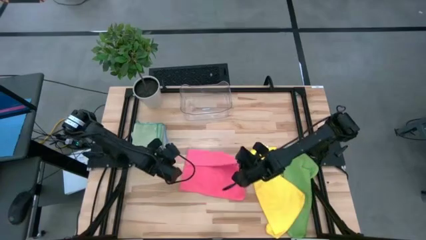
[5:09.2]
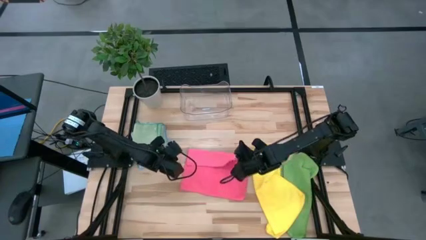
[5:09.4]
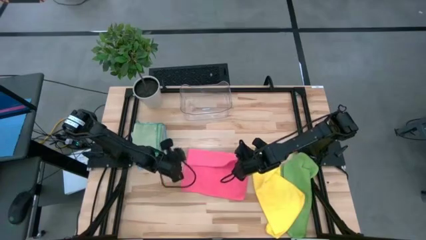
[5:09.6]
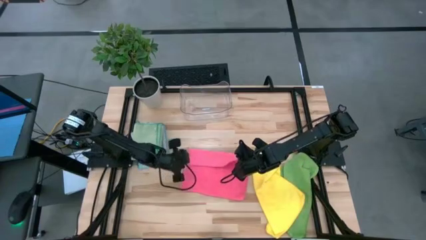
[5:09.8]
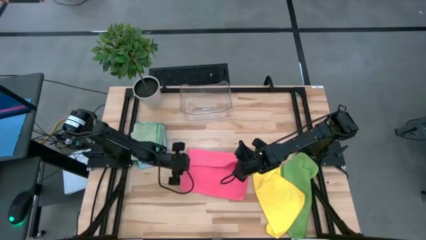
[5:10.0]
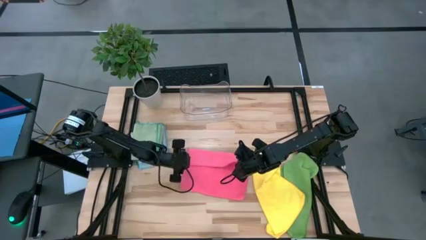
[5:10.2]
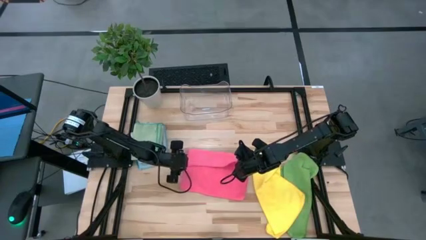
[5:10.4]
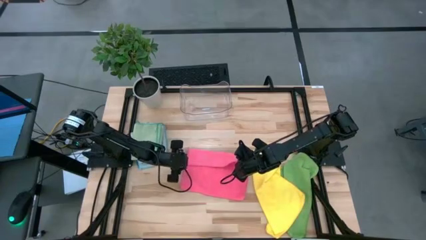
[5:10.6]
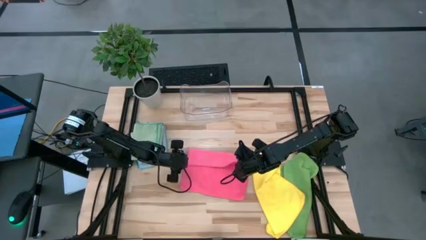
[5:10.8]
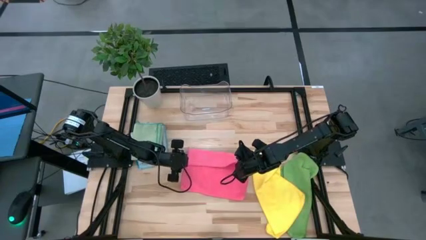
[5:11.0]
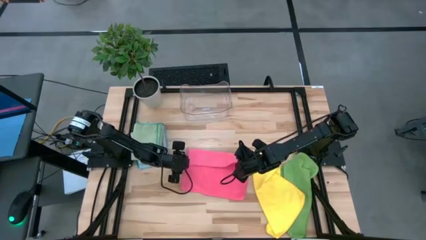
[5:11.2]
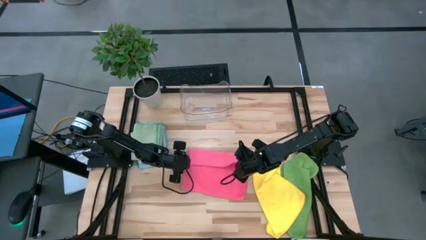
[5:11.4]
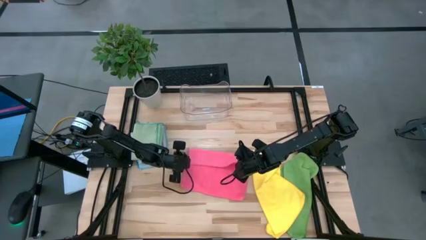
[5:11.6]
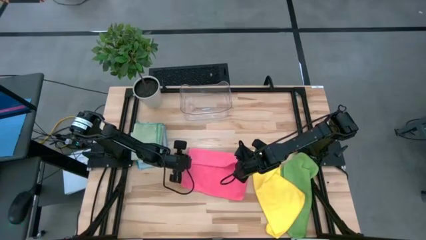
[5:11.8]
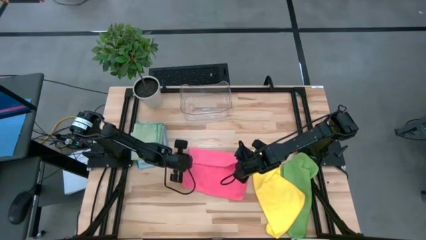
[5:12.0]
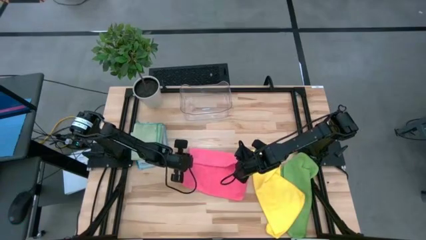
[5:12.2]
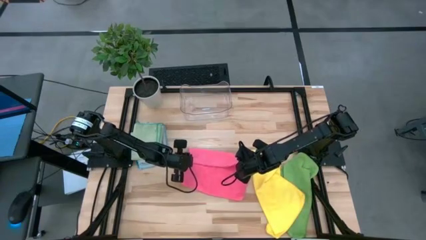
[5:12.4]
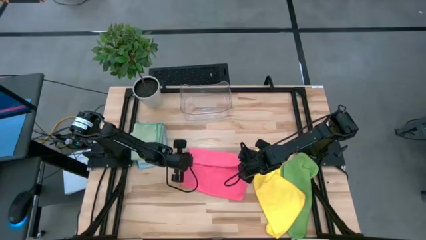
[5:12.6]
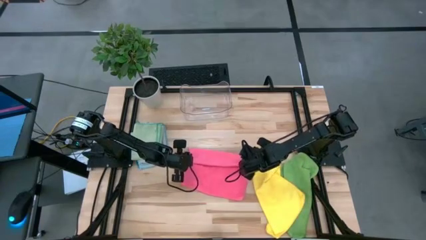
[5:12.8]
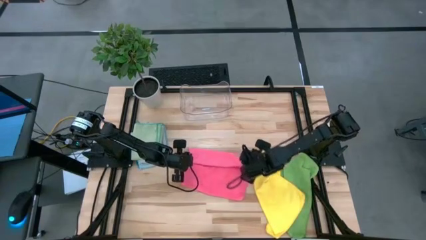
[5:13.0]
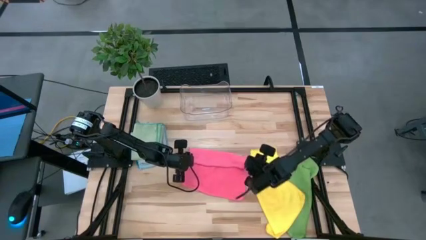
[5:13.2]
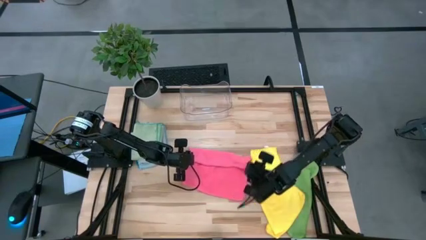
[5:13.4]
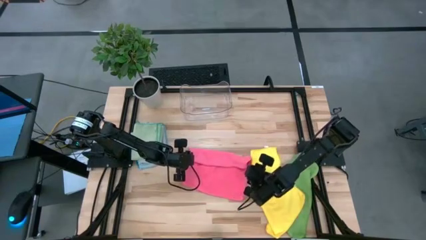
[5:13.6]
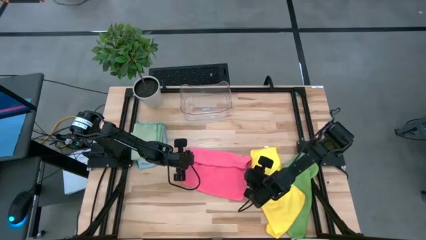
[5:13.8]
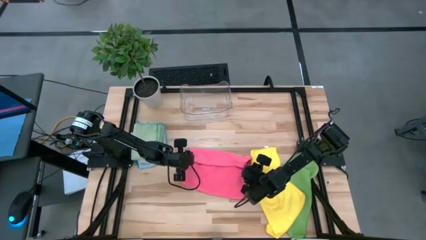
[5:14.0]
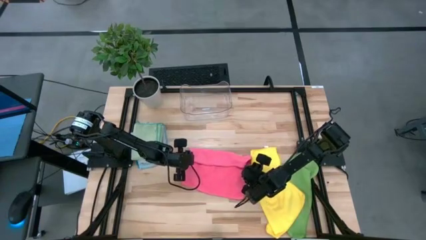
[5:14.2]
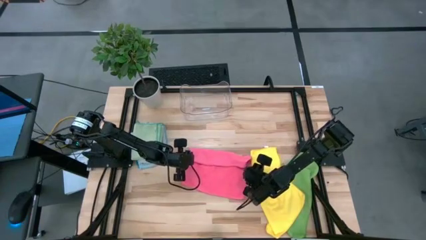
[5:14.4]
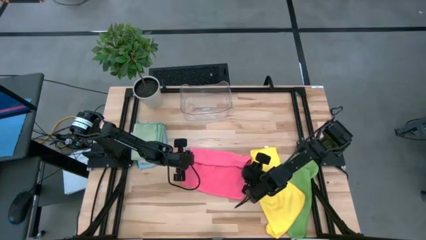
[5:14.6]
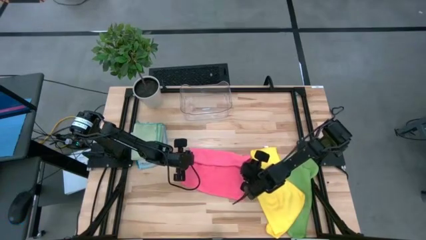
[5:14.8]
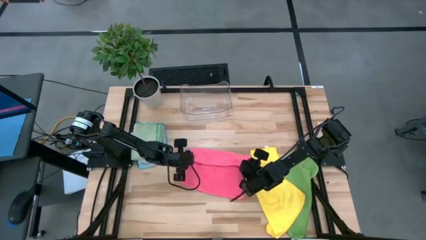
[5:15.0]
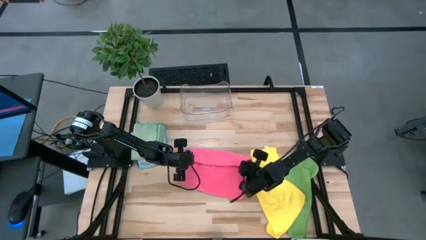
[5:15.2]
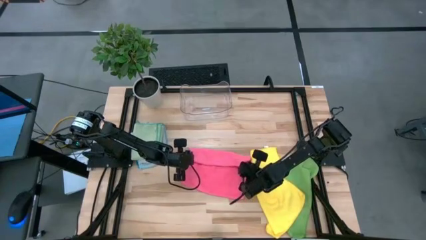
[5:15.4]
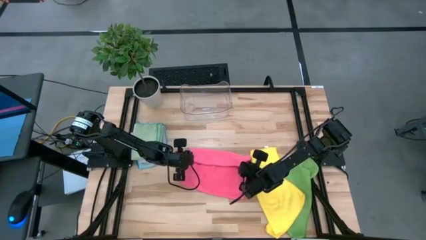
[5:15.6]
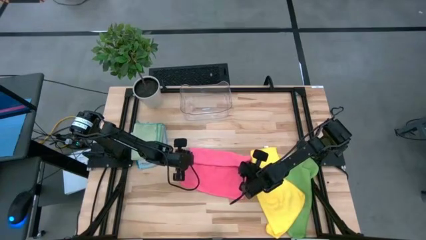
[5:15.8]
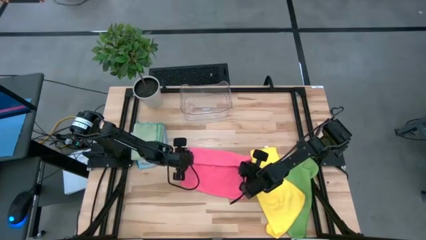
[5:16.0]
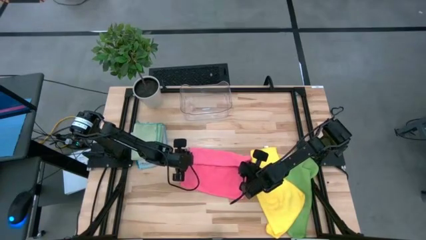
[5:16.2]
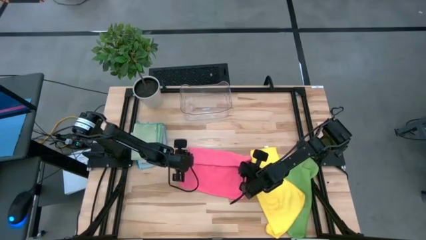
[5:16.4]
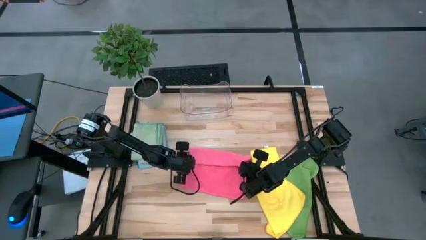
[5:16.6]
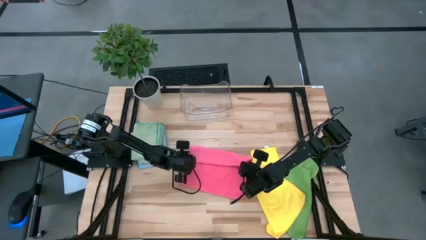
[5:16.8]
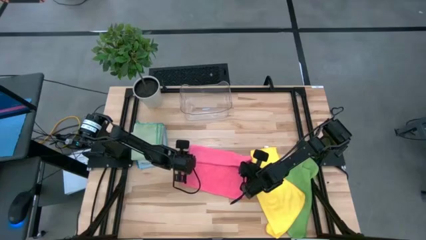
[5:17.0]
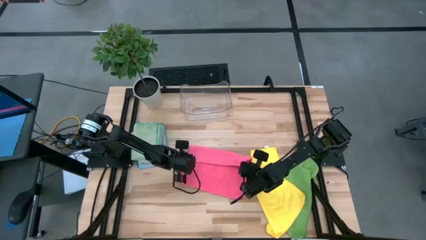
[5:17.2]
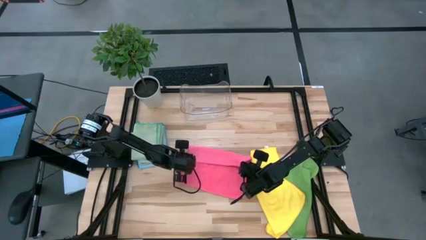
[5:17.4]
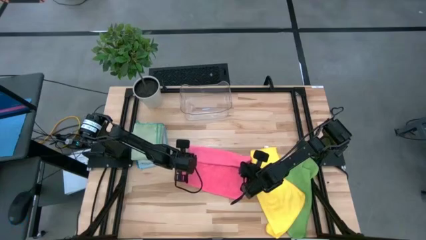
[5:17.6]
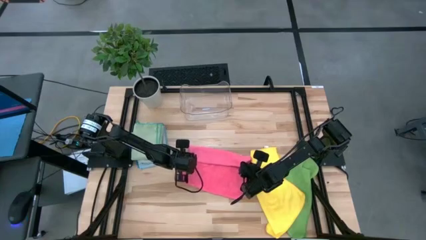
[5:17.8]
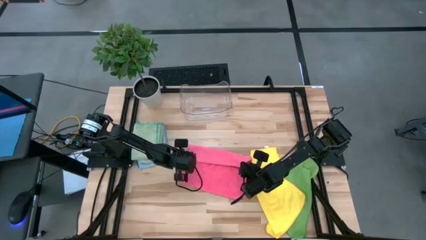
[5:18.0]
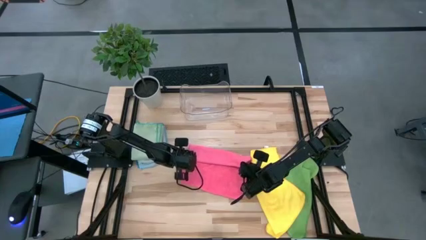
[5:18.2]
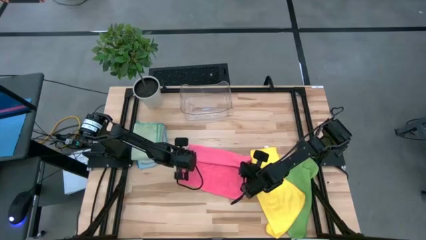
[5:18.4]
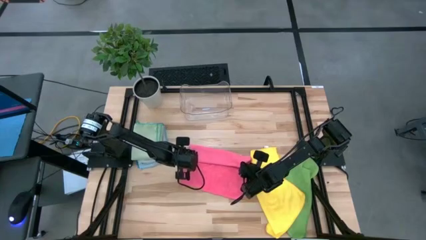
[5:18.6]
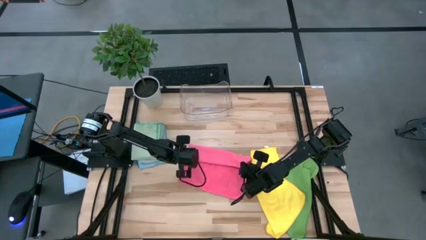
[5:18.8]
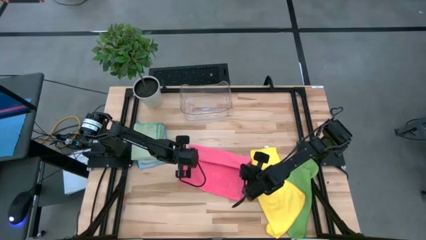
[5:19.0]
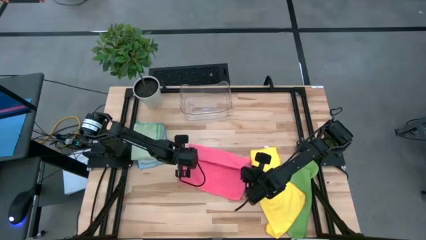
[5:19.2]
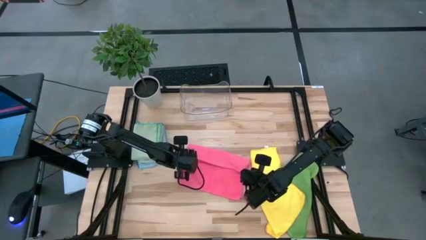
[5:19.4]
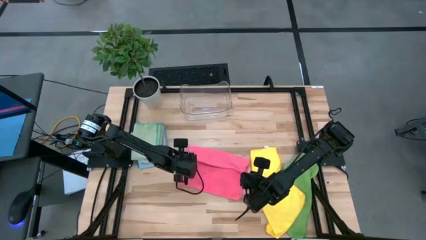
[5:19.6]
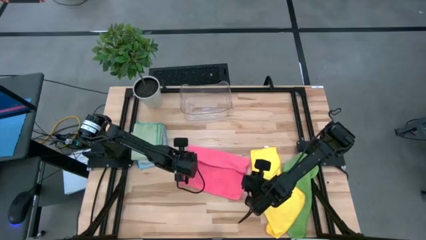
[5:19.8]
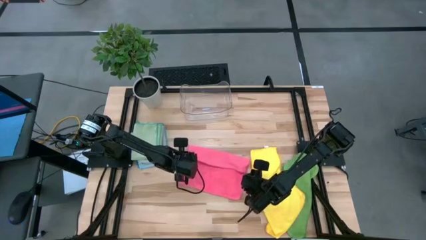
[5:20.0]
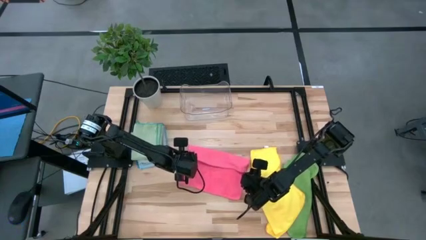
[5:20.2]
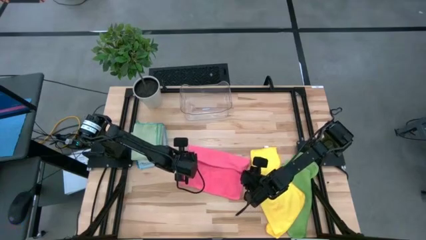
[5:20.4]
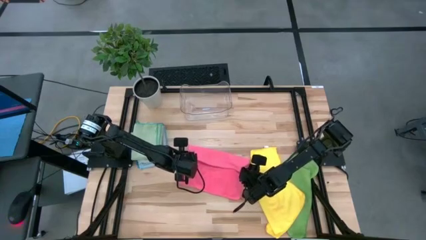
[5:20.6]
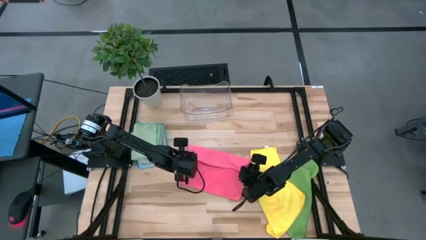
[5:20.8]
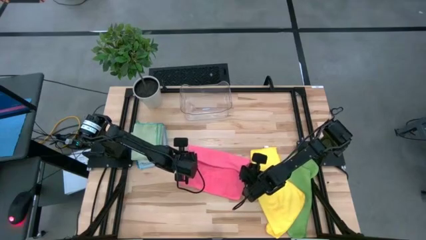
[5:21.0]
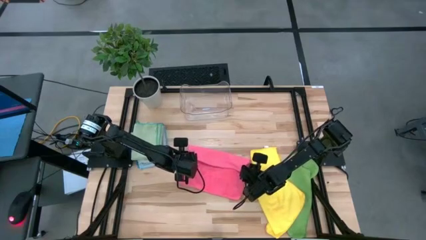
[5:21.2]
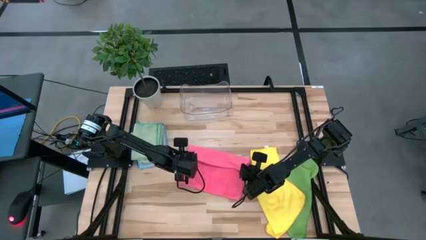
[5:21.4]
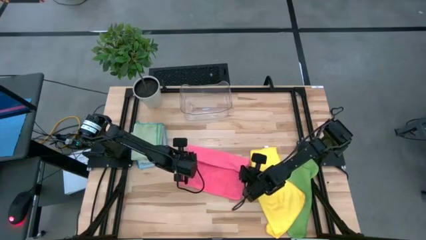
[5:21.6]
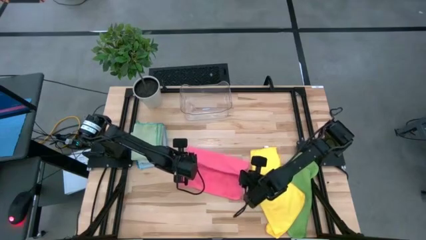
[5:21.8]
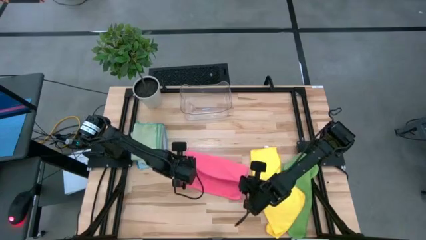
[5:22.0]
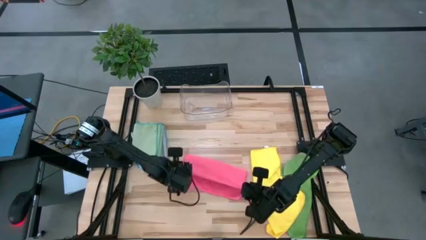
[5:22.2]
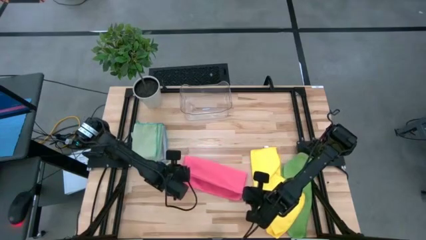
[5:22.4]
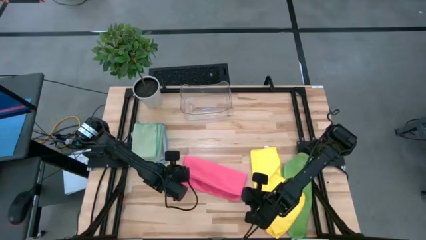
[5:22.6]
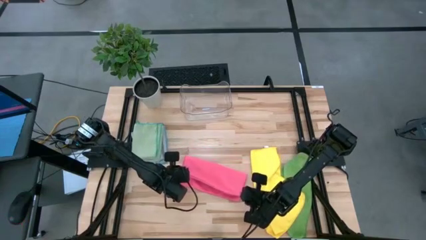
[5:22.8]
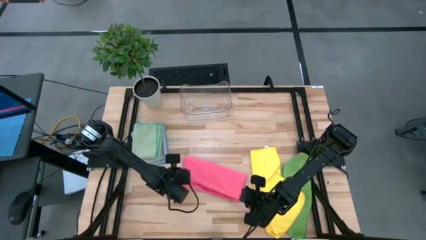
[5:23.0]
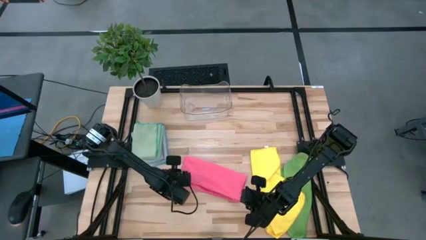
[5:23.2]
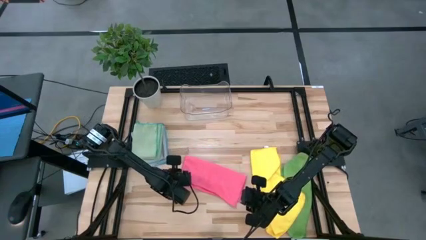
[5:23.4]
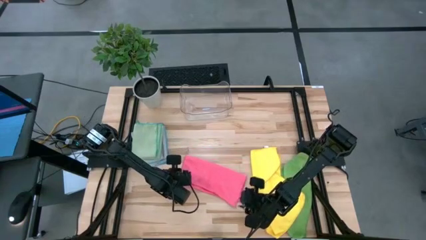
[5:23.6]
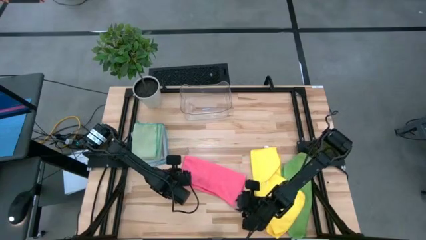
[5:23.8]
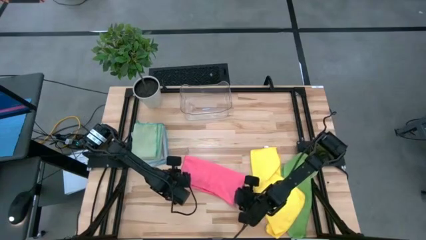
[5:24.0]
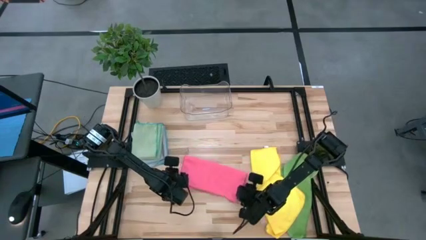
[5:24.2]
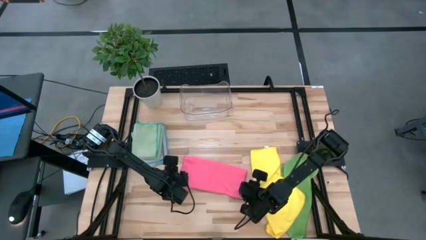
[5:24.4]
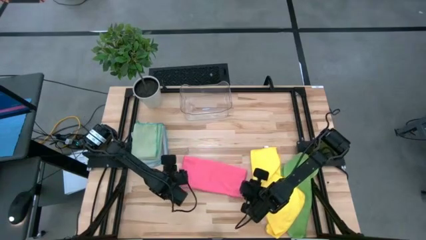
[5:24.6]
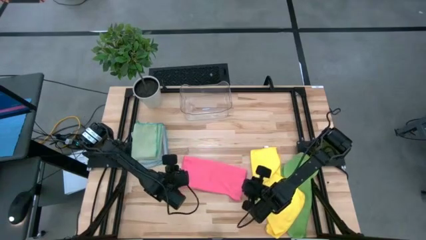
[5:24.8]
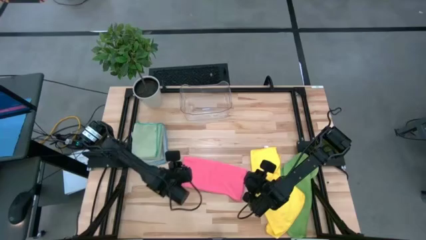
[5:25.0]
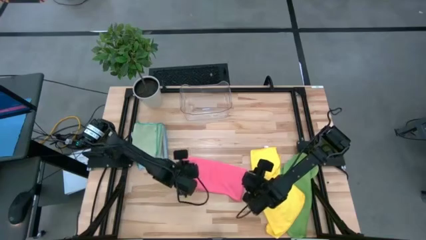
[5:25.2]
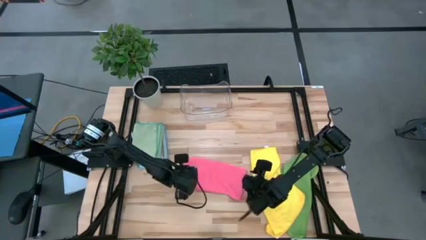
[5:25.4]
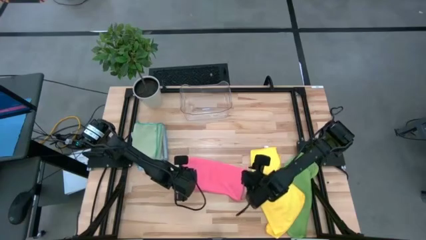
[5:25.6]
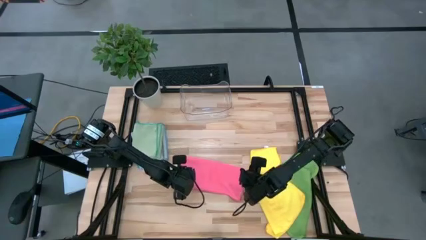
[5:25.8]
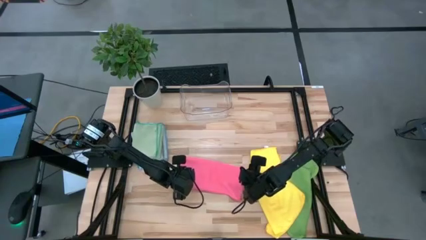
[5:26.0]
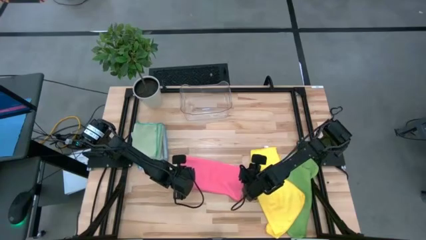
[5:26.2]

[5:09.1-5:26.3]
Task: Fold microfiber towels
Fold the pink microfiber cloth
